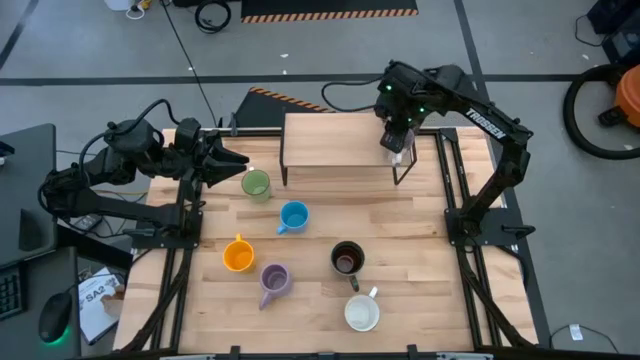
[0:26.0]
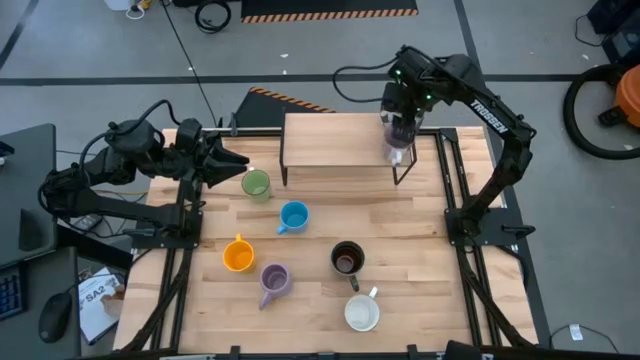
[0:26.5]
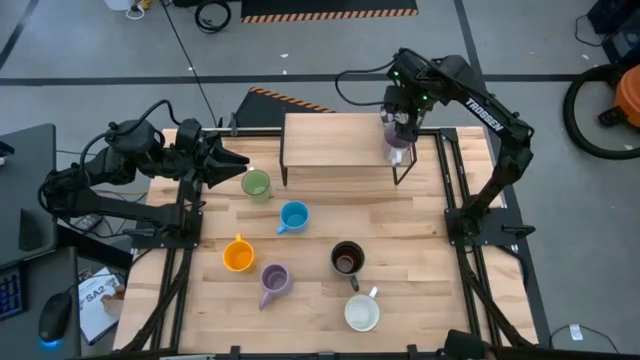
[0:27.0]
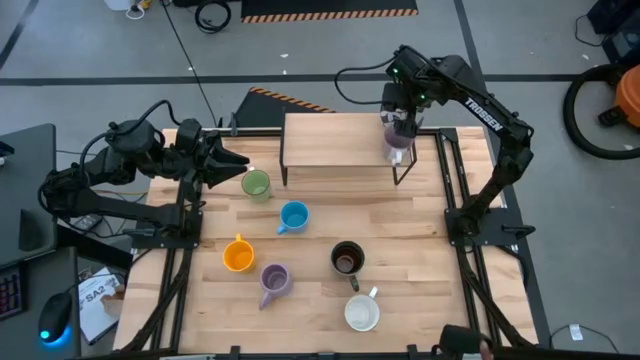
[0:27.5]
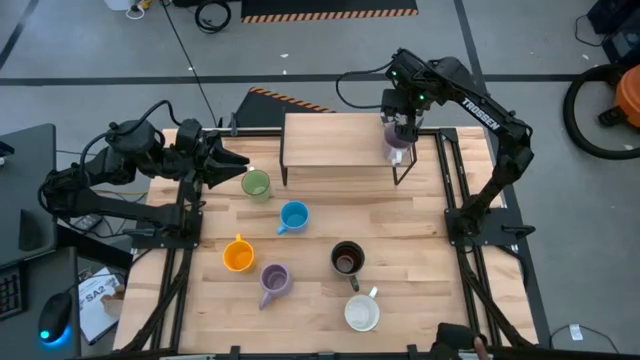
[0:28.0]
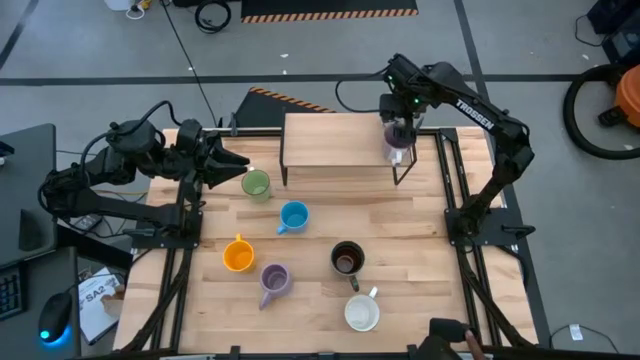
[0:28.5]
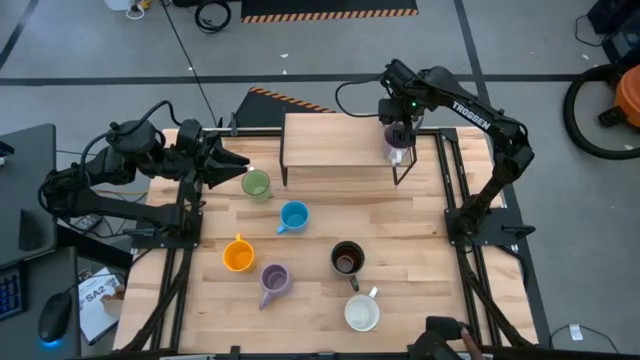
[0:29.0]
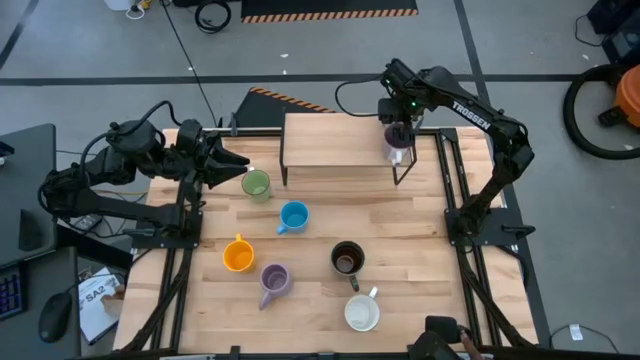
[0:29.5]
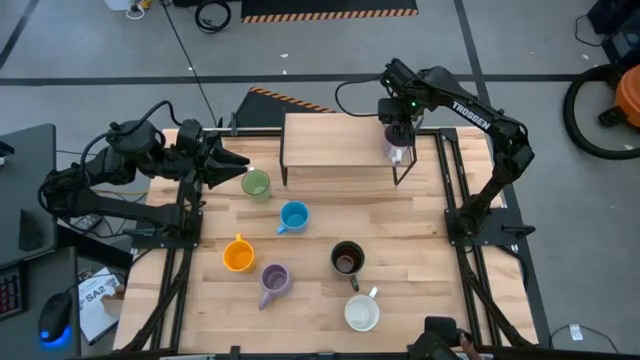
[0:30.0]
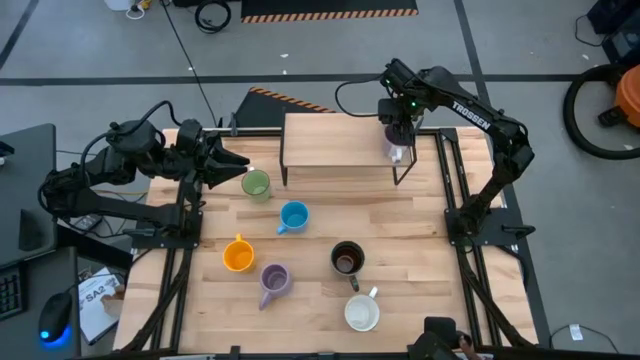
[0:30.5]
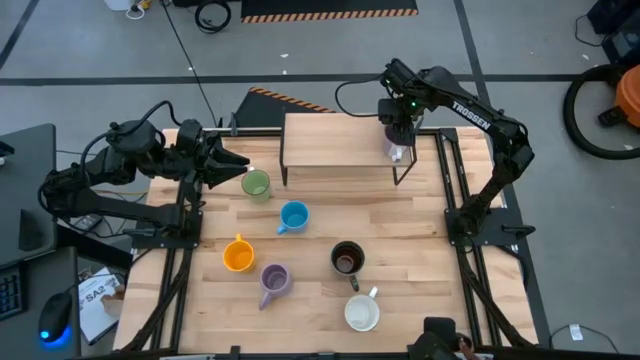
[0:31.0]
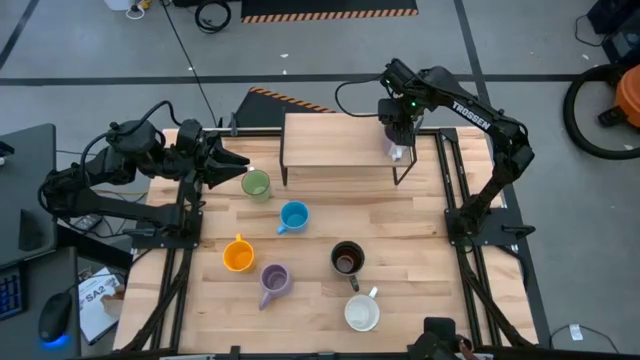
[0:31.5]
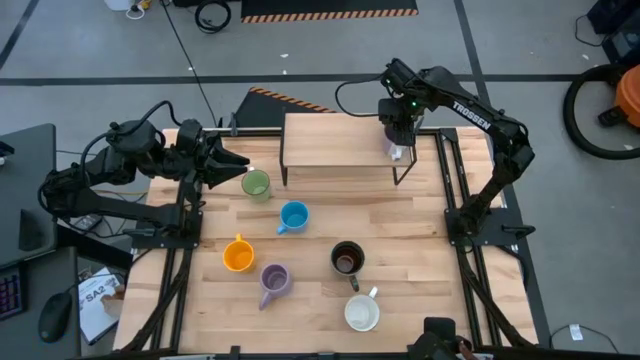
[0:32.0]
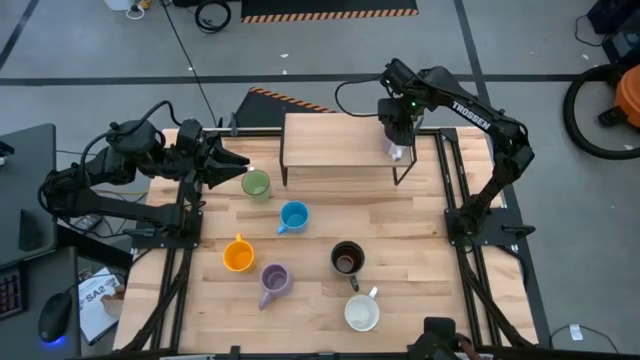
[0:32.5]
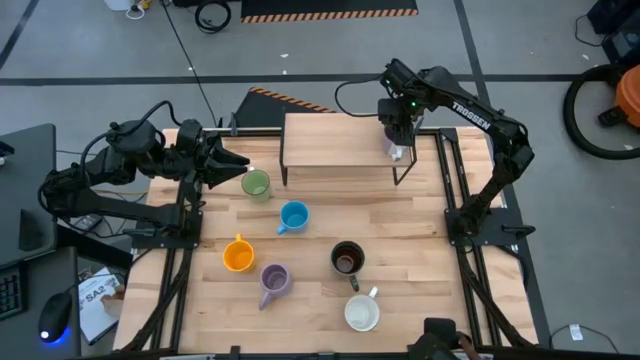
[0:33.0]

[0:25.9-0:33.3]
Task: Place coffee mugs
Adjust the mugs on the shelf

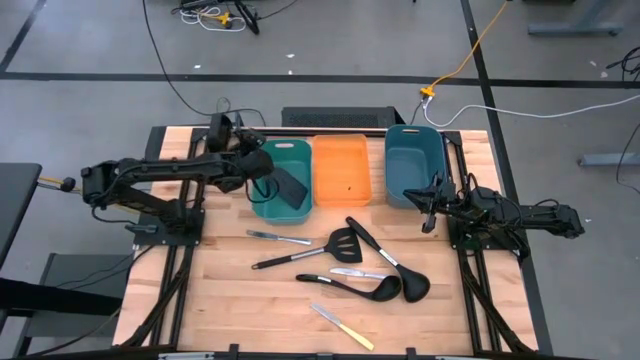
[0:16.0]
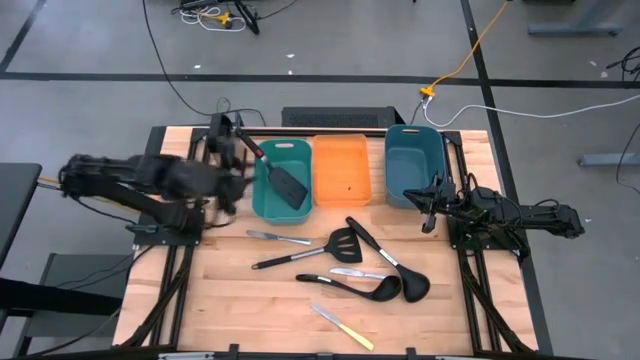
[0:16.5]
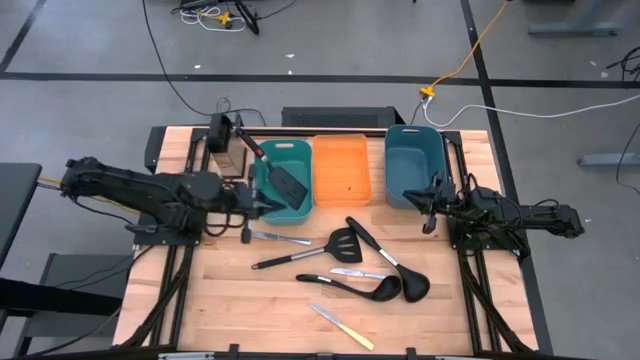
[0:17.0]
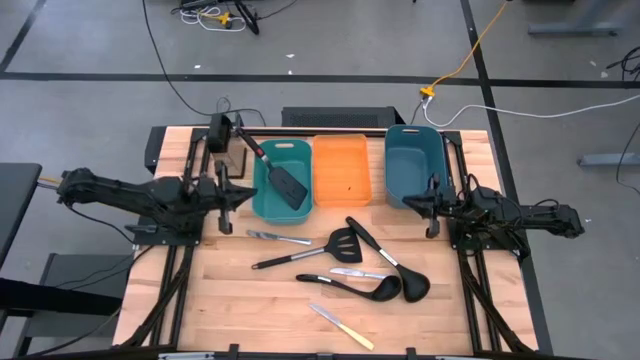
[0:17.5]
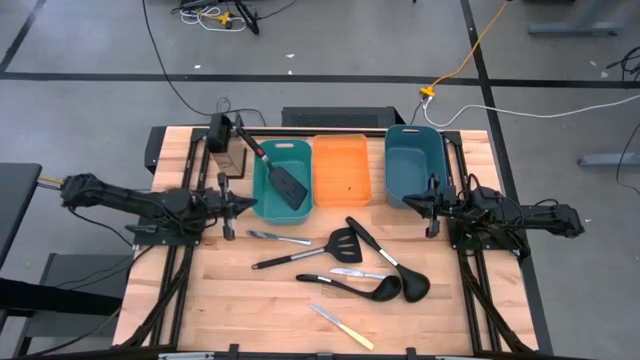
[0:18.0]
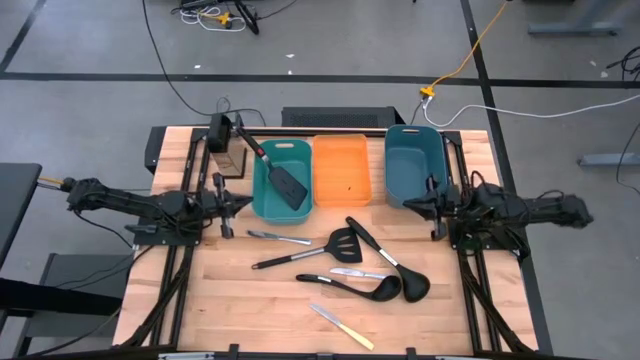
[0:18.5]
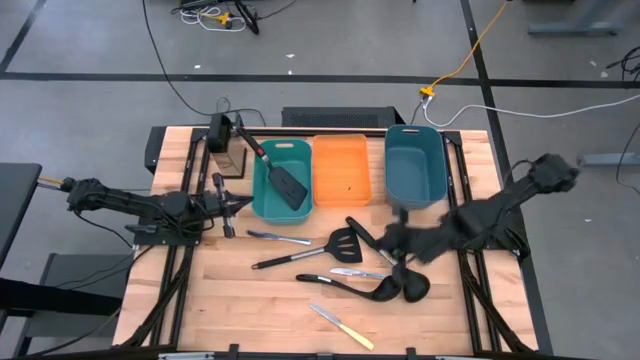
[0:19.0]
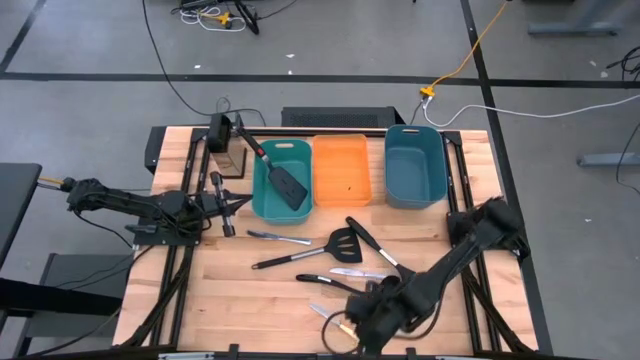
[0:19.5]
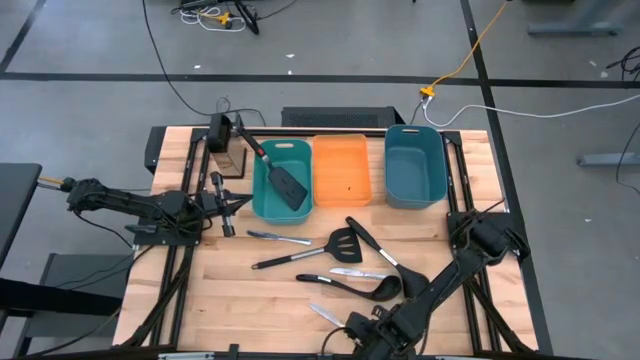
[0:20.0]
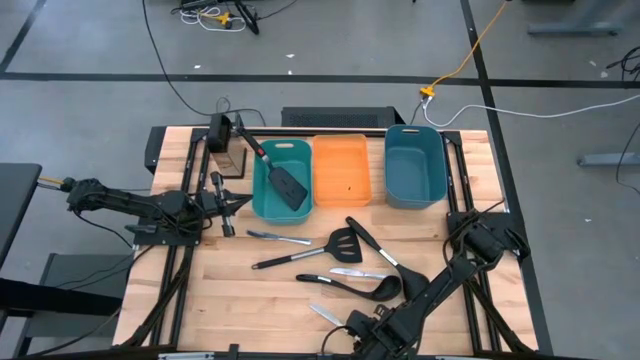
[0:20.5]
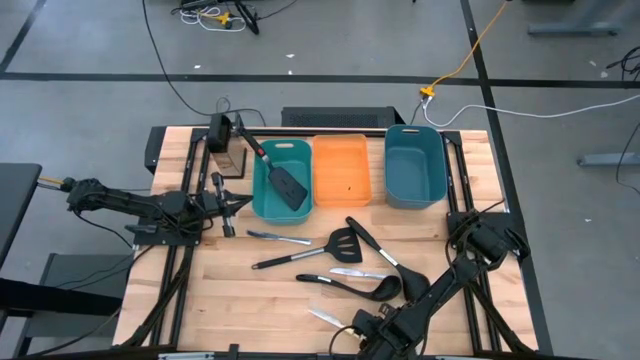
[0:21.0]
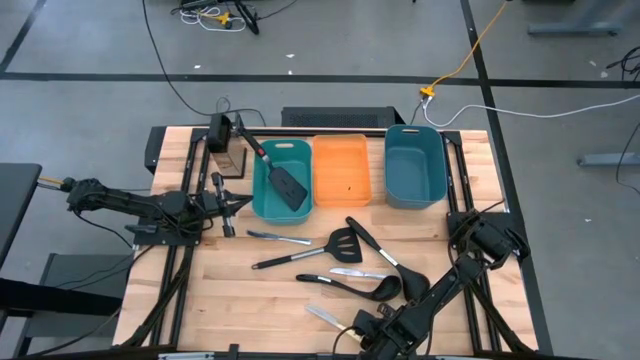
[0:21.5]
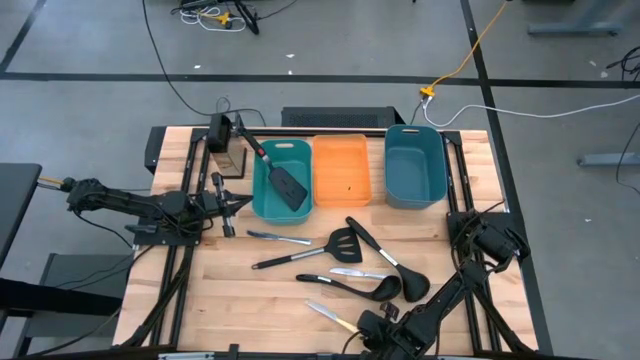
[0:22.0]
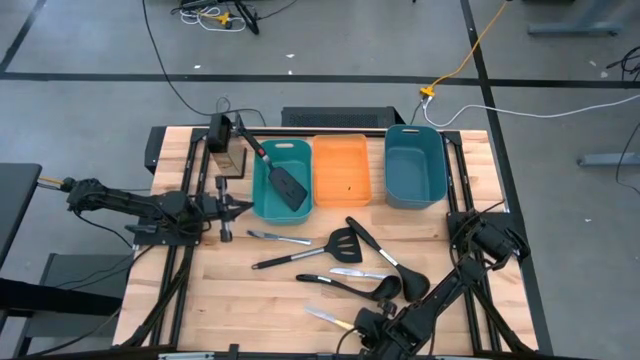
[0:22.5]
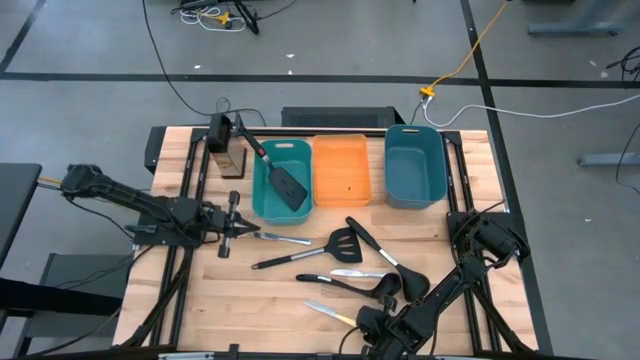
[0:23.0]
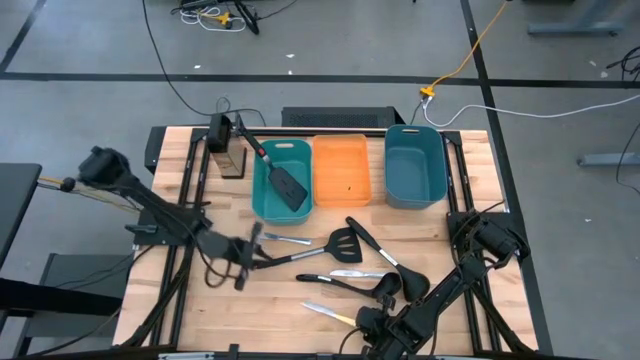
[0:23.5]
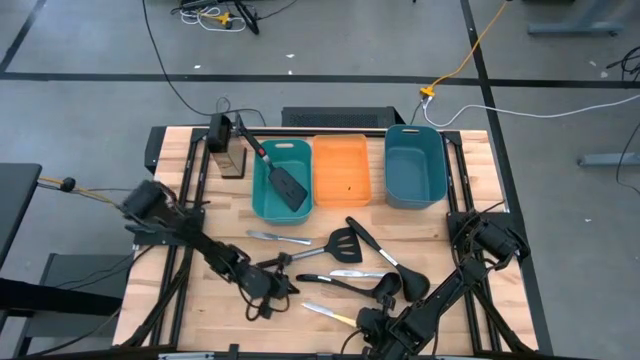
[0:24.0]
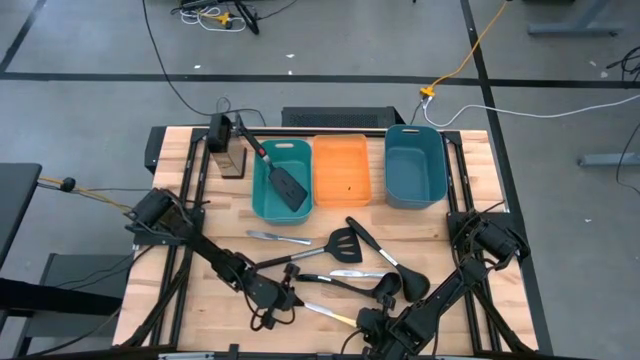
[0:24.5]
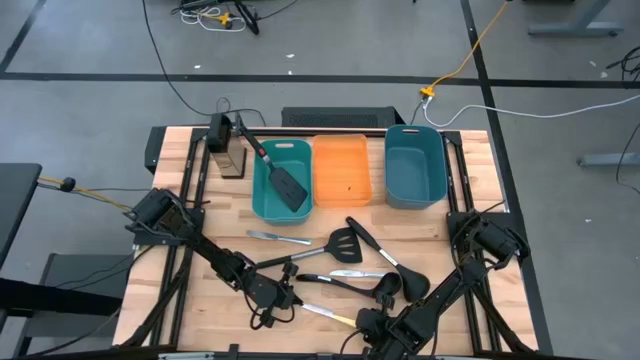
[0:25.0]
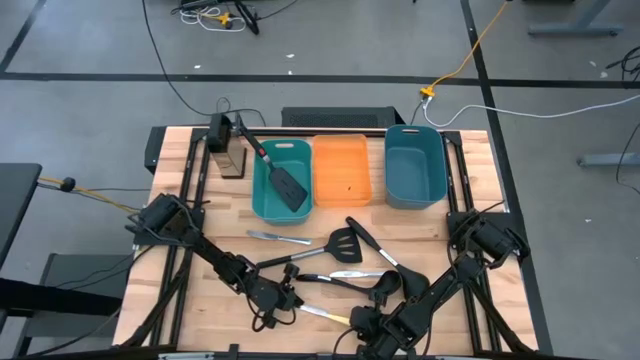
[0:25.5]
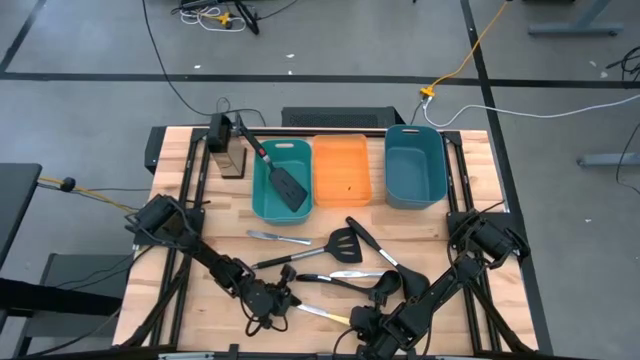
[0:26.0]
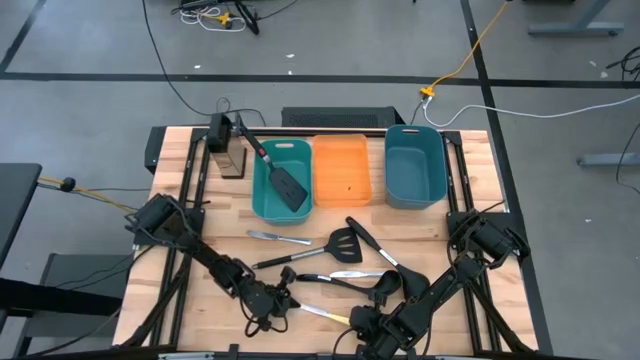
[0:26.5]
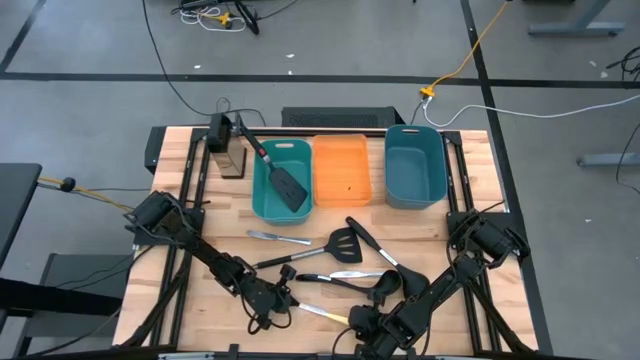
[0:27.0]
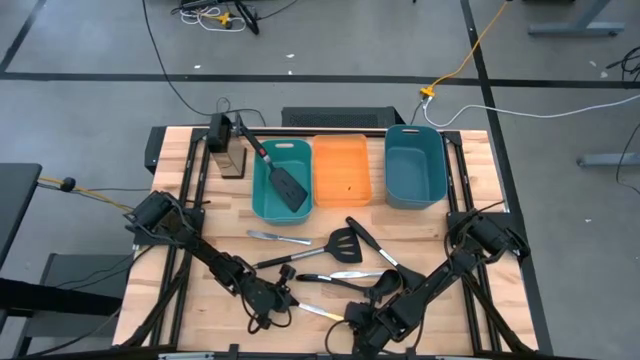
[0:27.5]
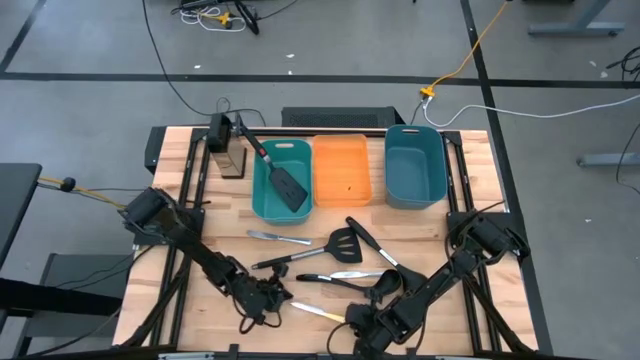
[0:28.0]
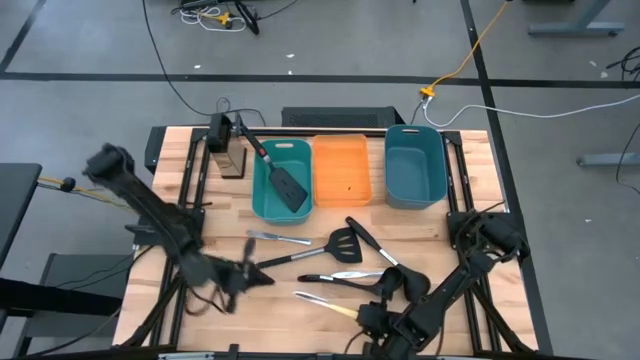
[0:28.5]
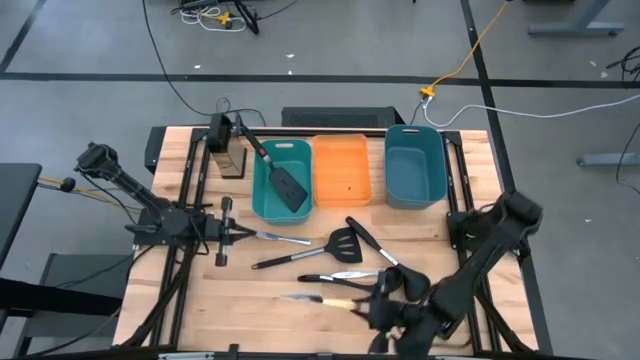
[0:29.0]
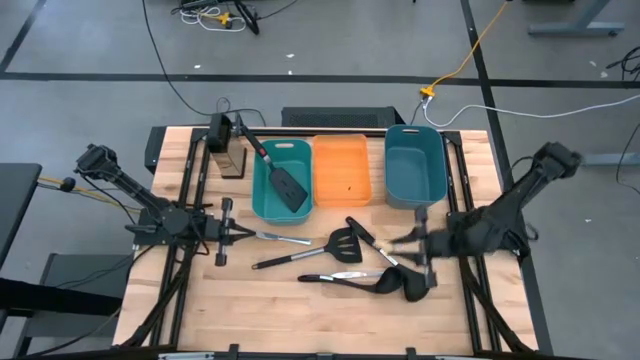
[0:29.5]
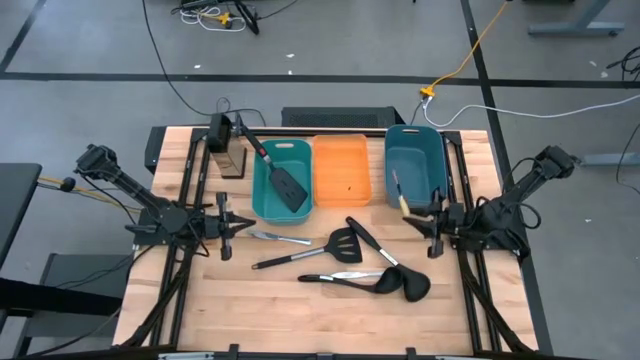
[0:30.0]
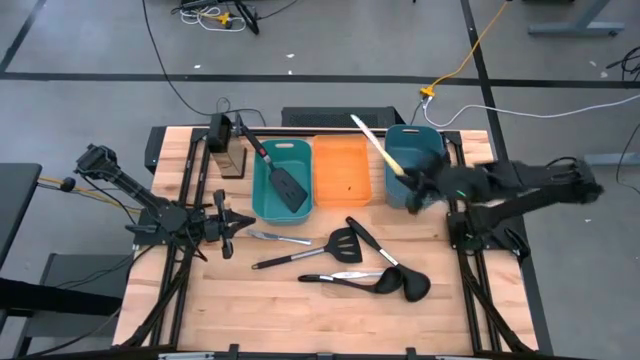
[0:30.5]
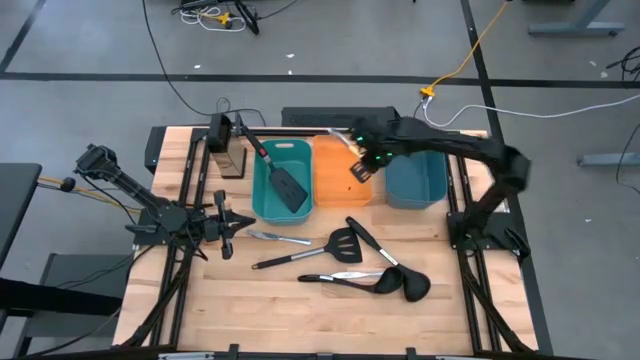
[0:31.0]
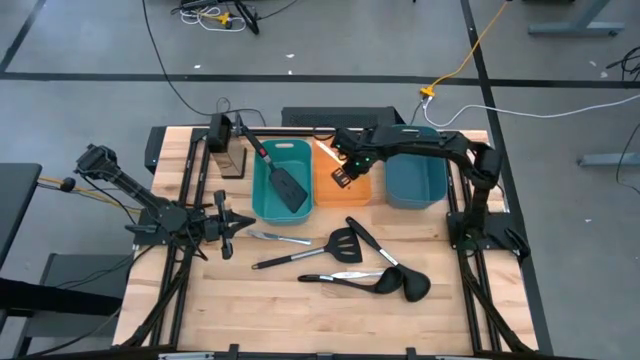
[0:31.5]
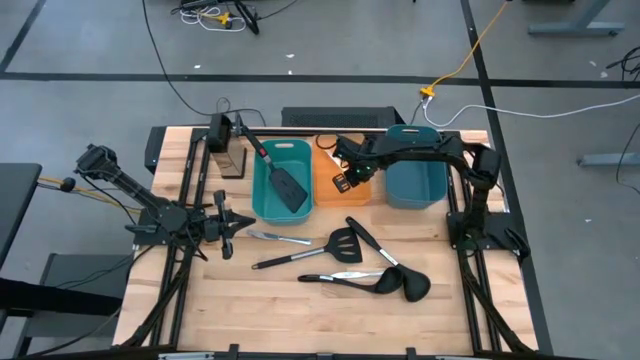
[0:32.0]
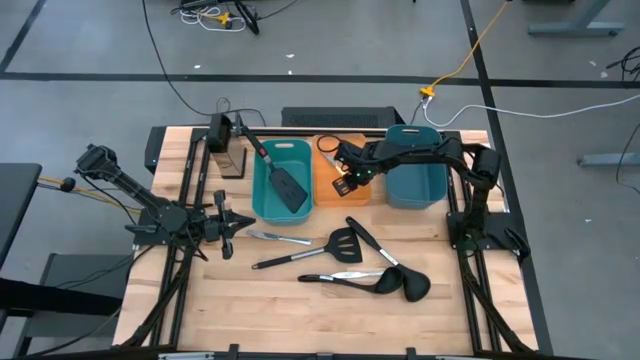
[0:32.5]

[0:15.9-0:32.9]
Task: Pick & Place Kitchen Items
Put the yellow table knife into the orange bin
